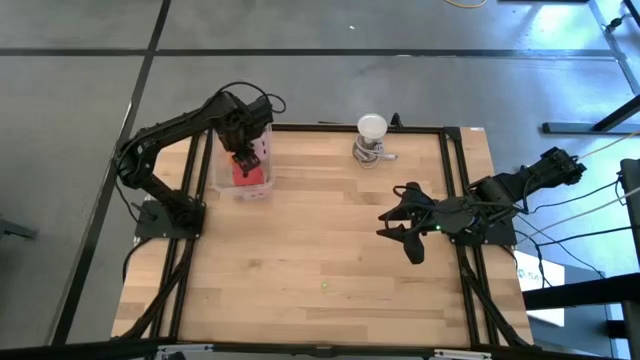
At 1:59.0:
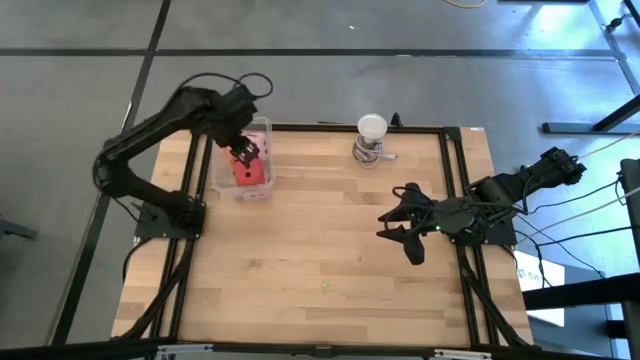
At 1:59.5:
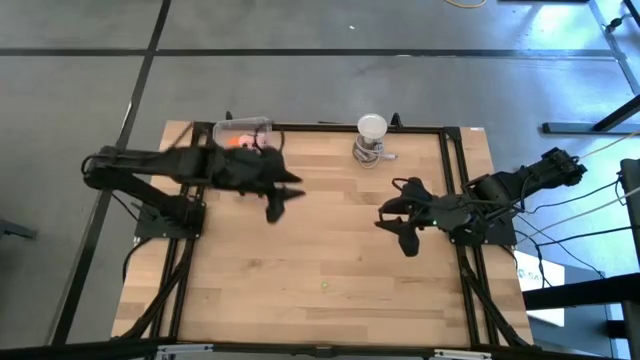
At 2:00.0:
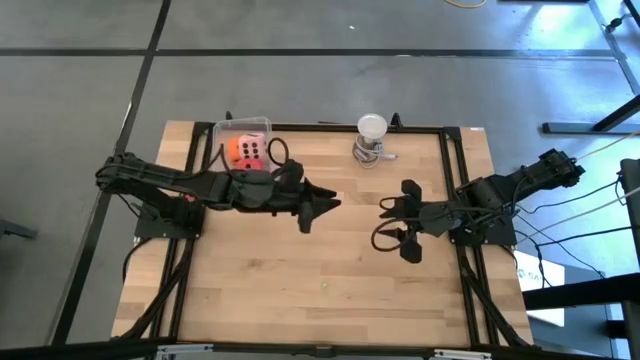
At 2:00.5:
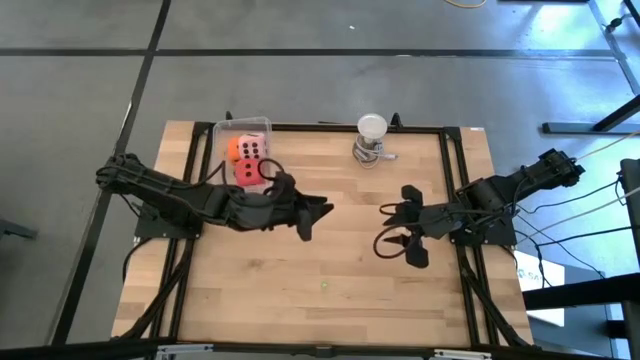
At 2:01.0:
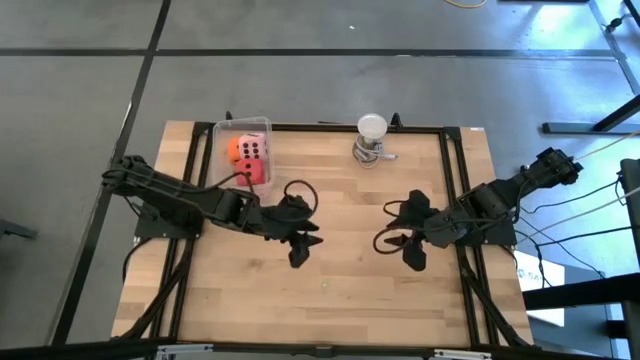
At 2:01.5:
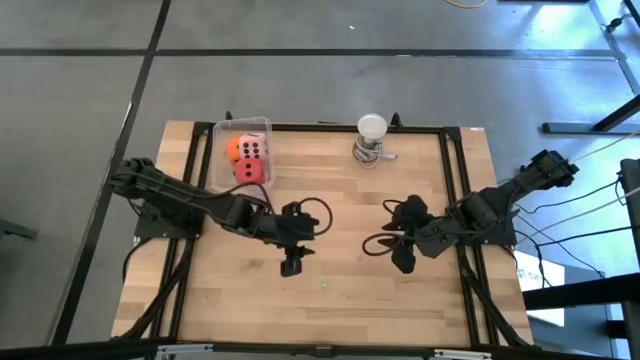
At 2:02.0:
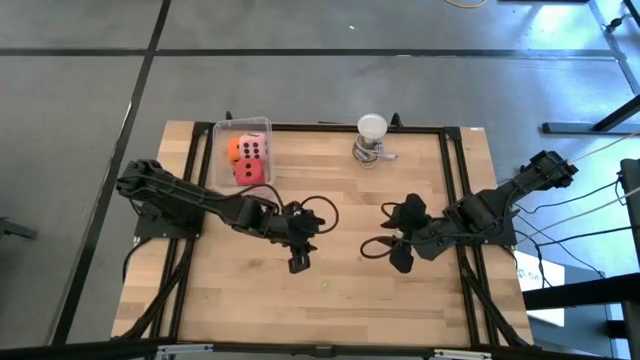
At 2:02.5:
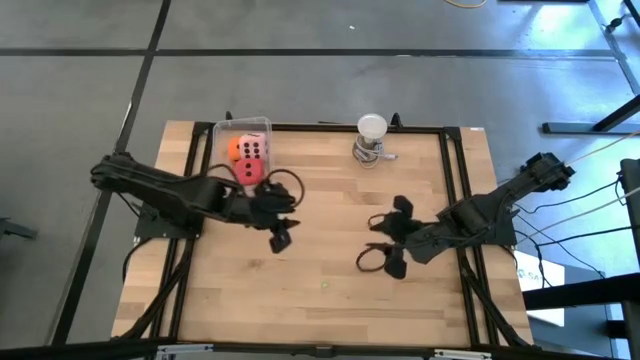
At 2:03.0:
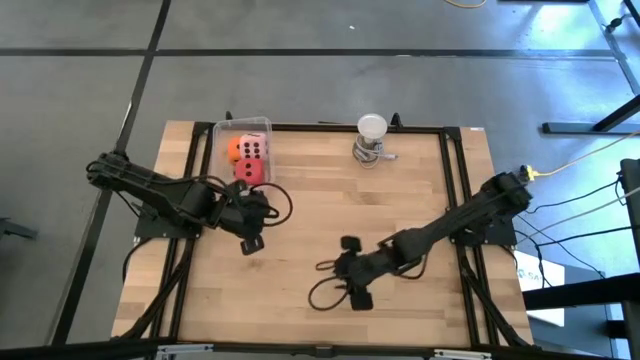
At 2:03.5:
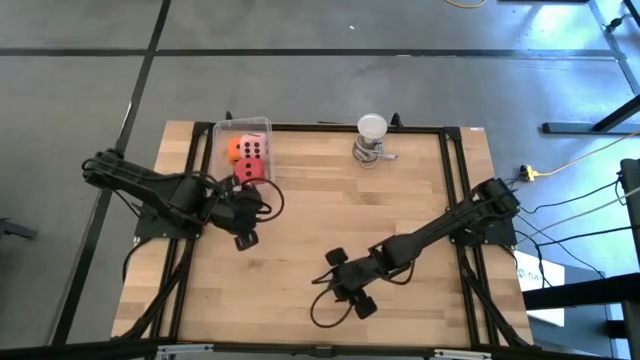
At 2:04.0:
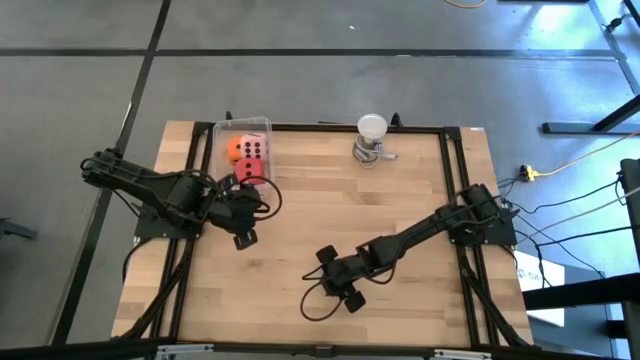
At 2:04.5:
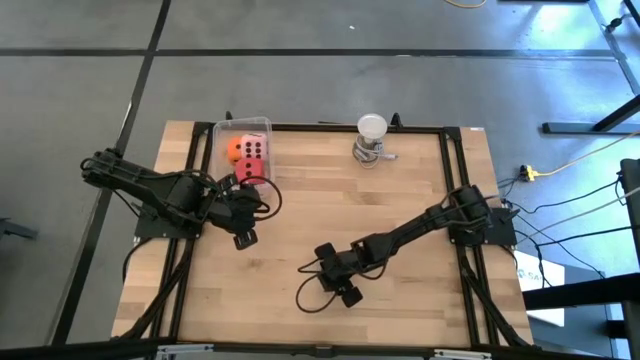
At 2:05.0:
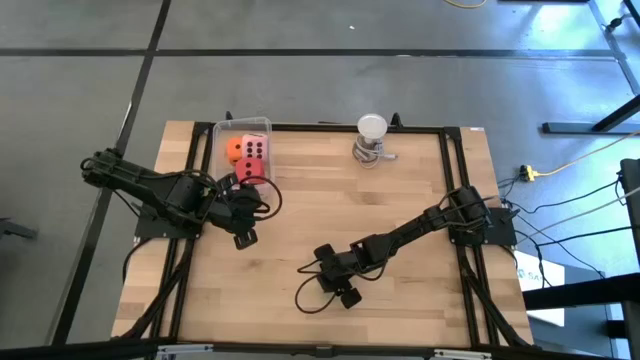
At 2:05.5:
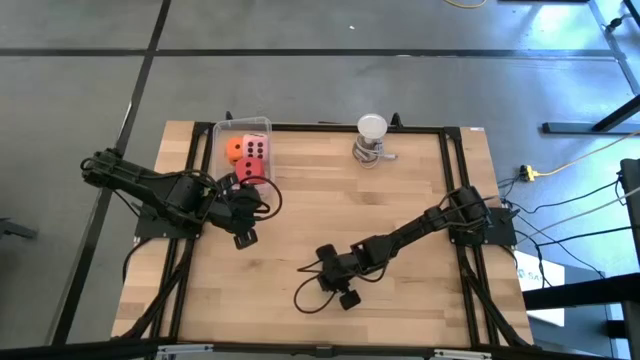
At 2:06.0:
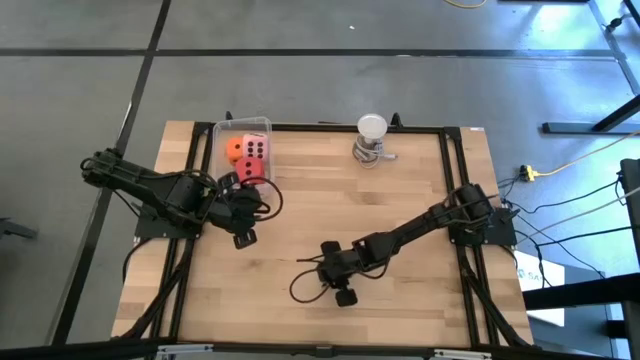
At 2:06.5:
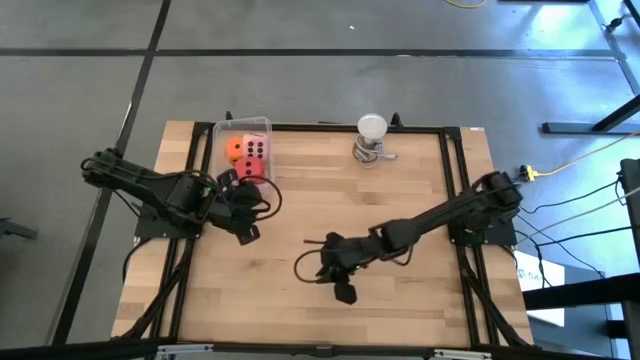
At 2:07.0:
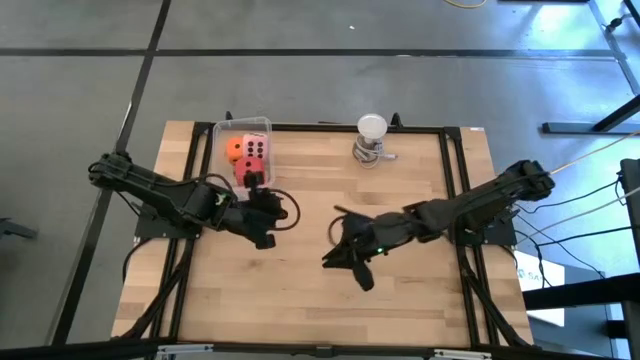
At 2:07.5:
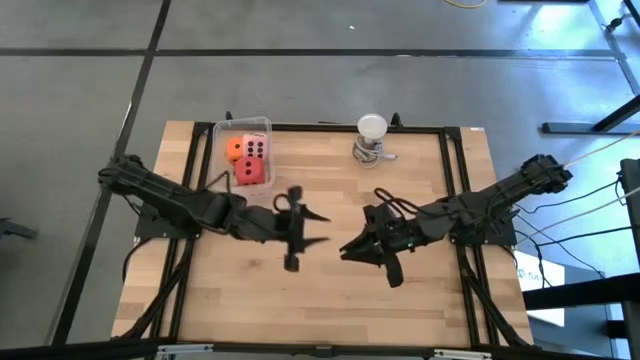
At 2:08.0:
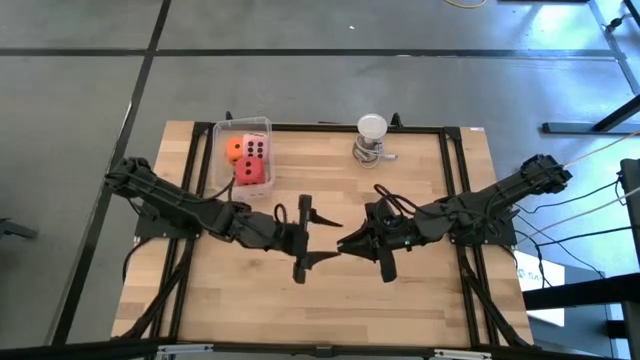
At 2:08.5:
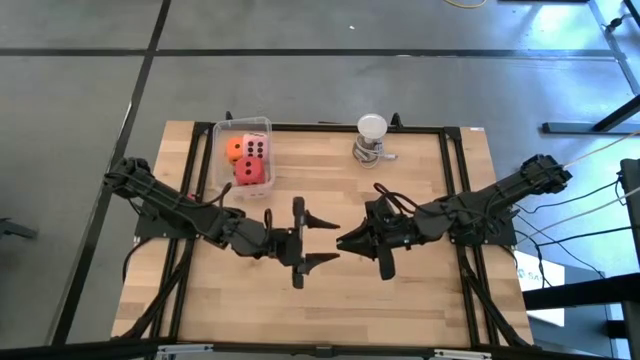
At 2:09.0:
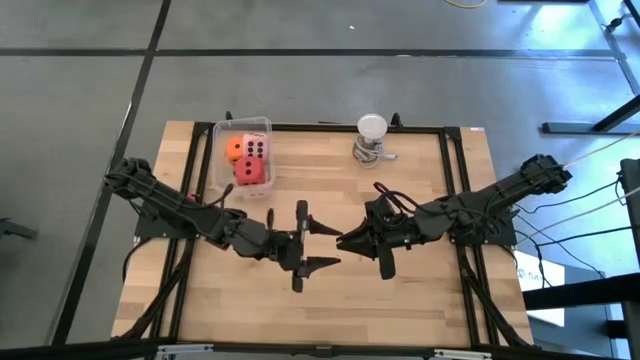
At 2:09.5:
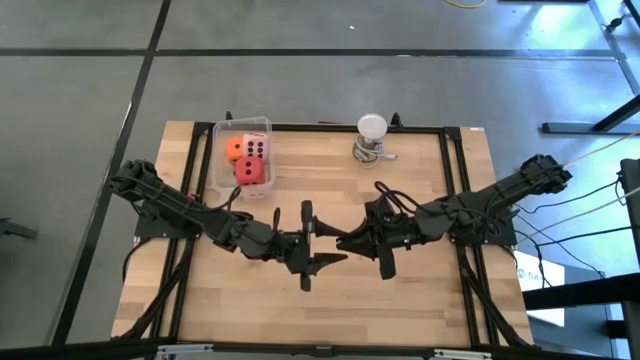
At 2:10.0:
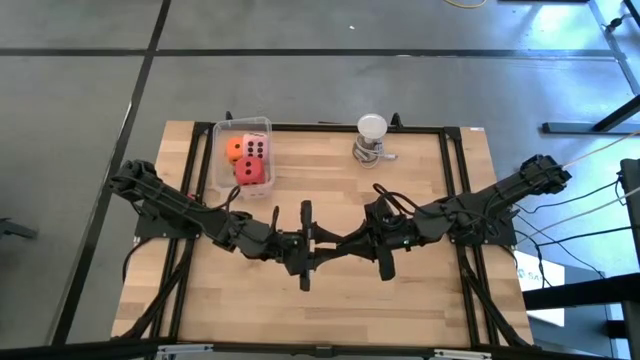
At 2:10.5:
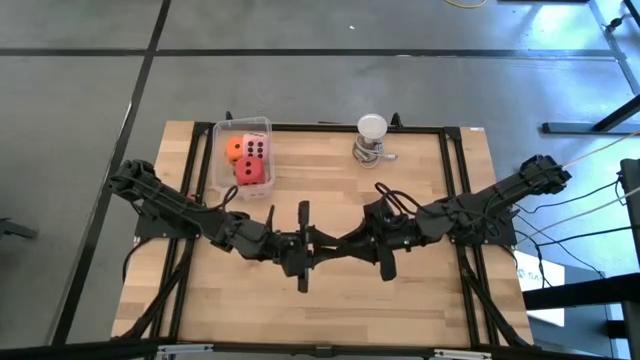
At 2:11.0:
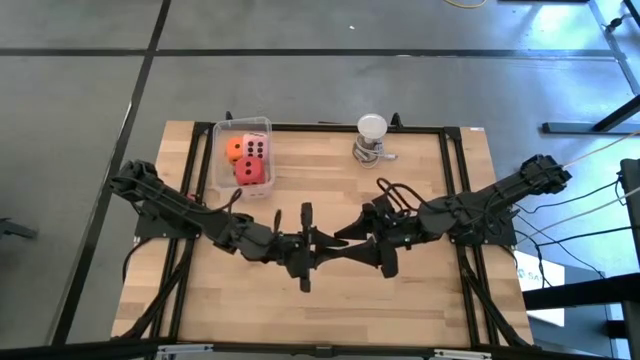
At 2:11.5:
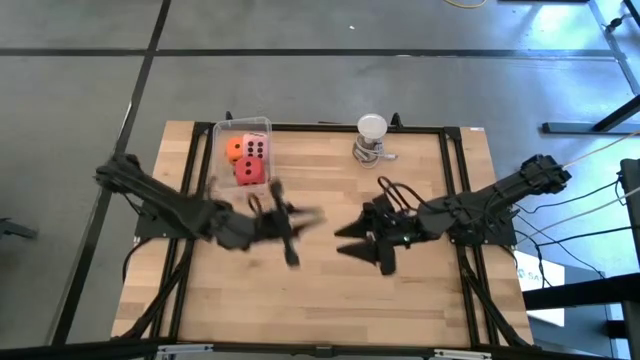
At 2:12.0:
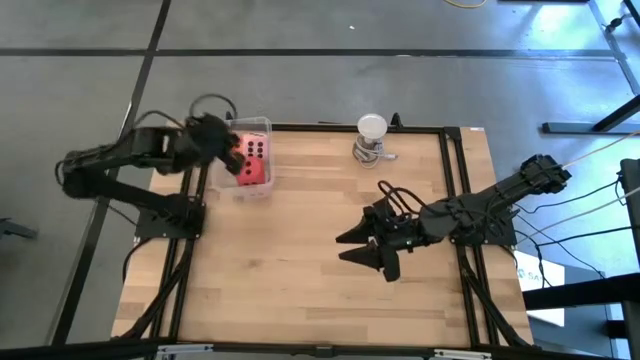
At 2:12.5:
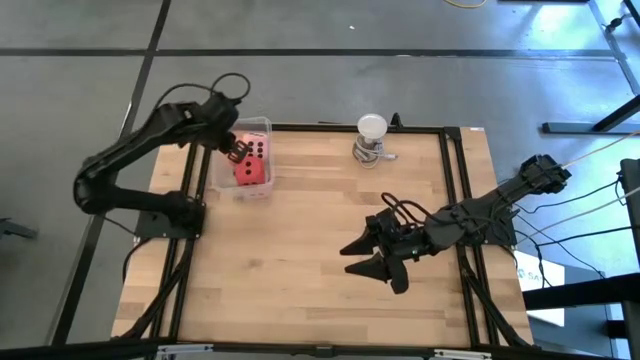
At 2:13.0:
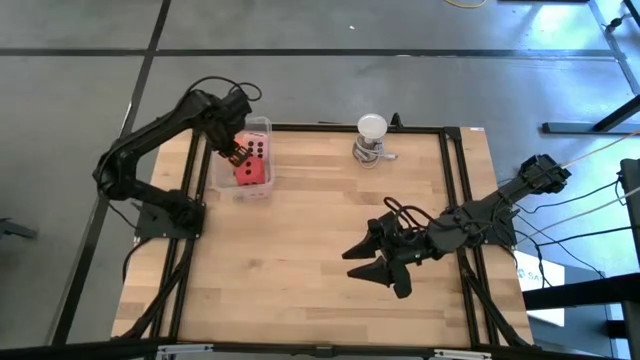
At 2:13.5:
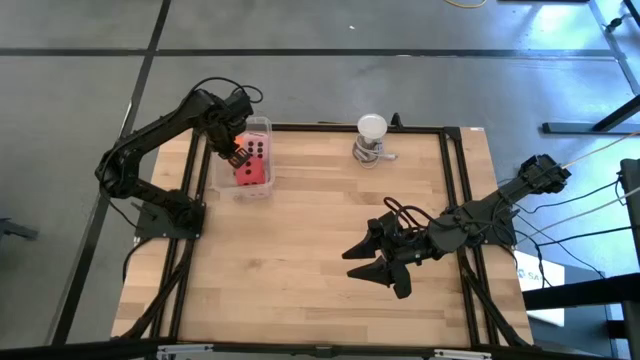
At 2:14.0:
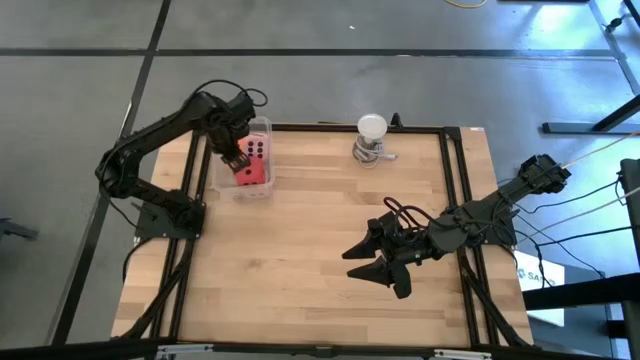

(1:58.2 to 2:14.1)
Task: Pick & Place Dice
Put the small green dice into the transparent bin

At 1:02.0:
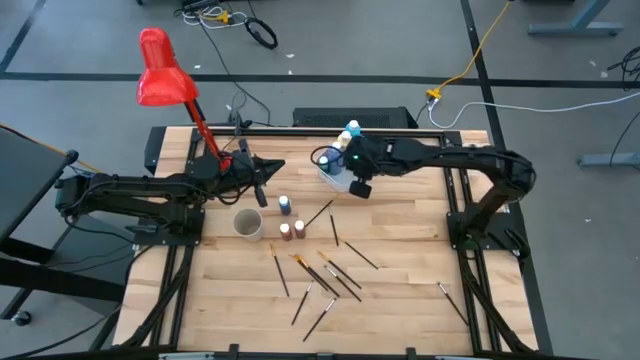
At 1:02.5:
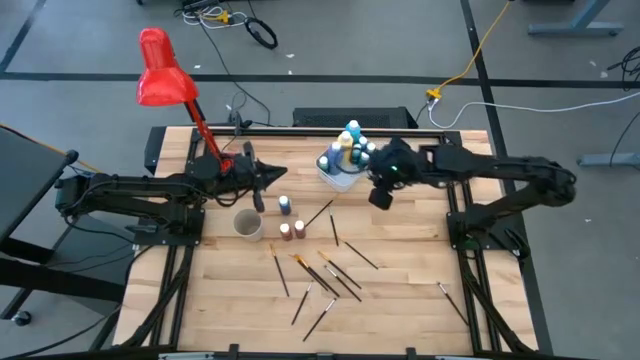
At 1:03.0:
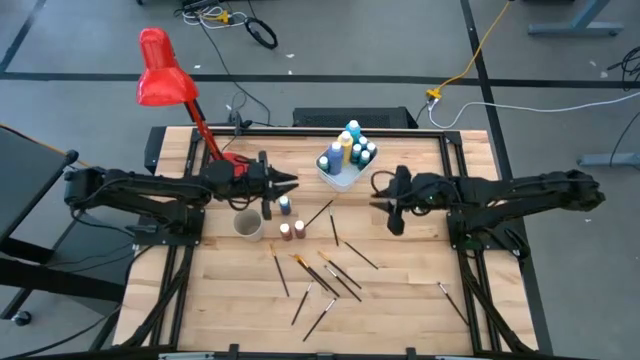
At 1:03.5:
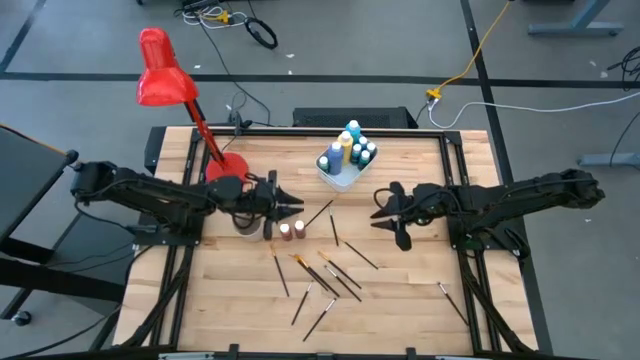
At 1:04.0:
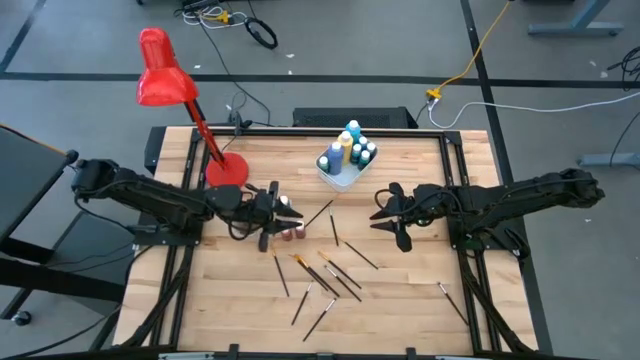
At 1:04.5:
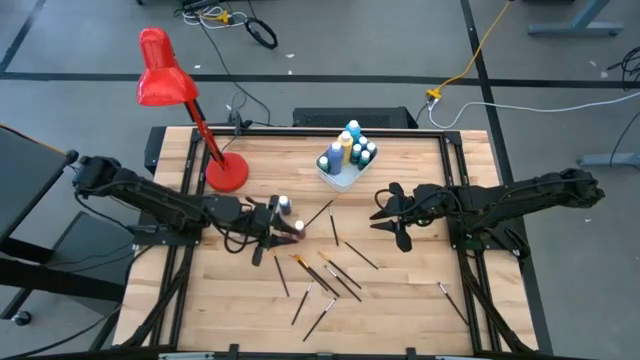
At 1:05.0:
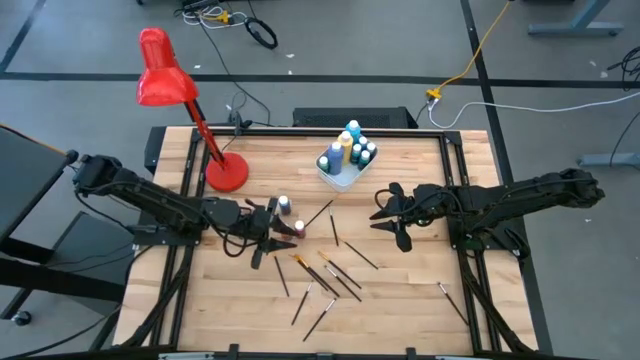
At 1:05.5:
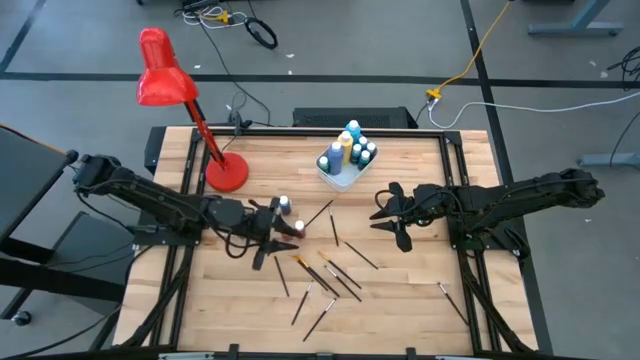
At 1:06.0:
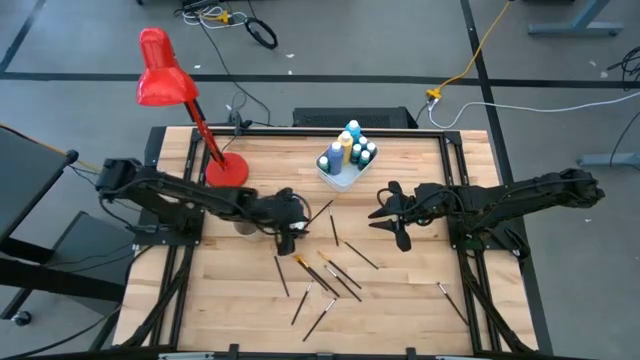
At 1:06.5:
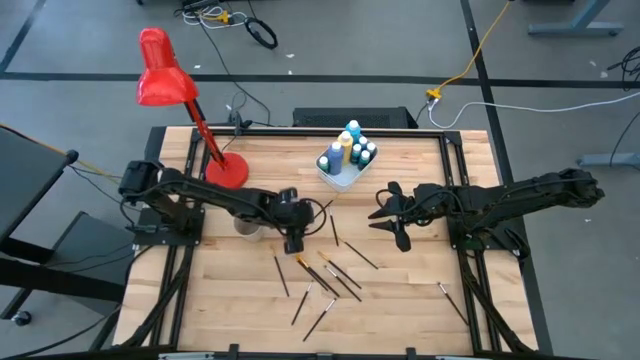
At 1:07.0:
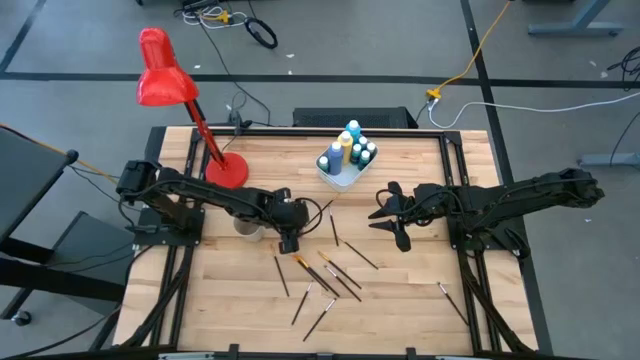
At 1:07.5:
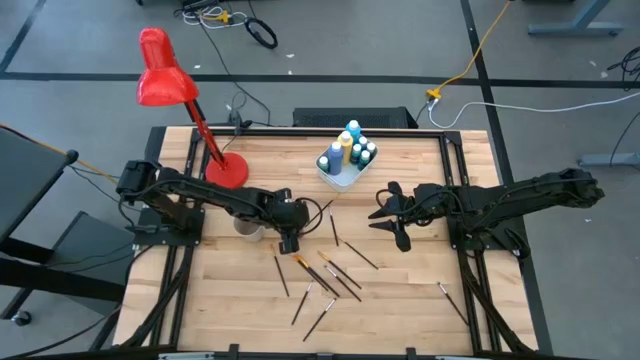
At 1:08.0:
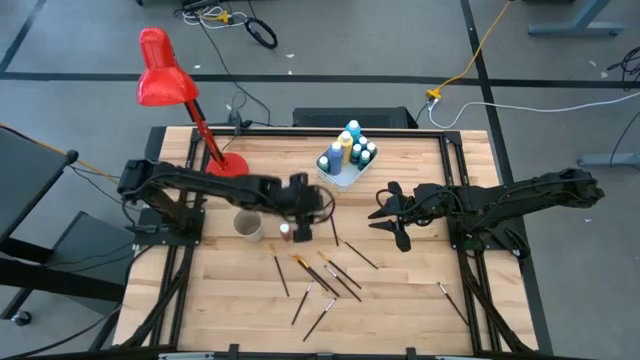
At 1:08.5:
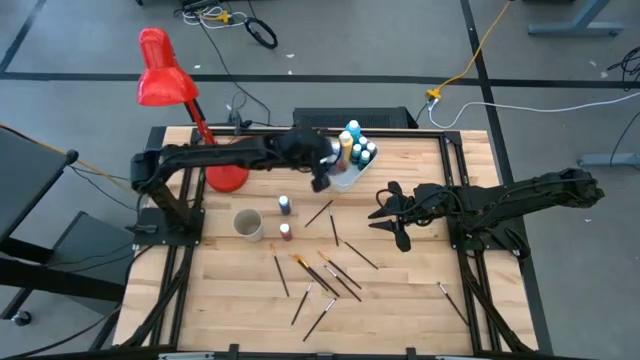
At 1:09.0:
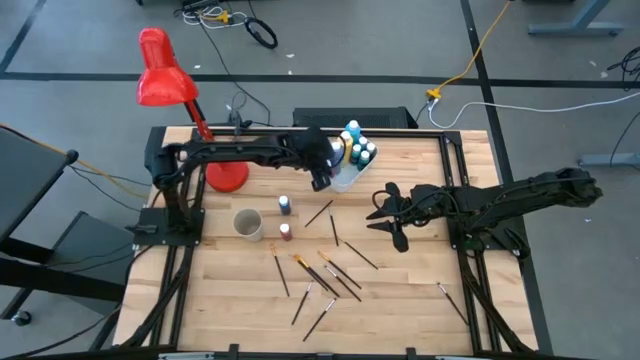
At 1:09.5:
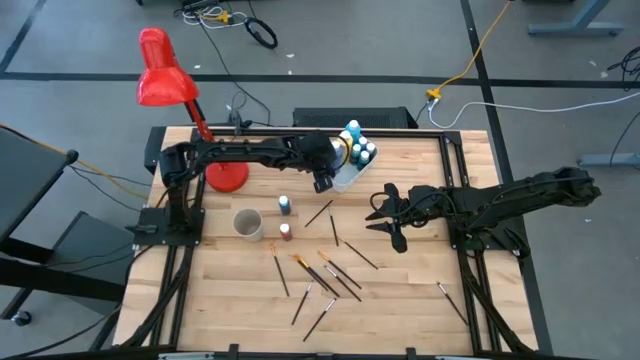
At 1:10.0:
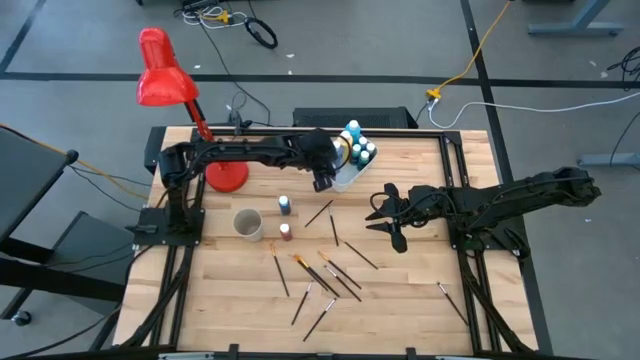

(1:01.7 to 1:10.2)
Task: Pick & Place Paint Supplies
Put the small red paint bottle into the white bin
